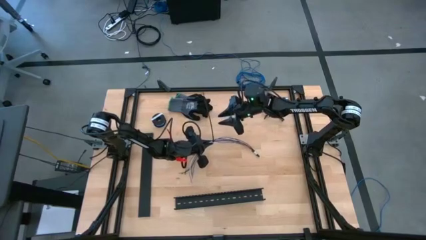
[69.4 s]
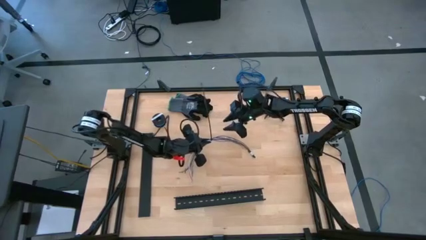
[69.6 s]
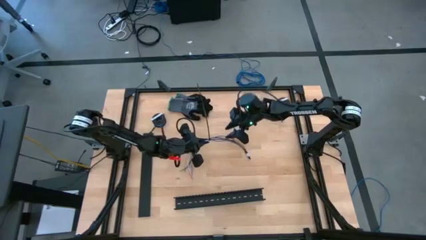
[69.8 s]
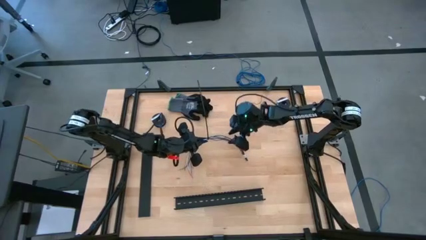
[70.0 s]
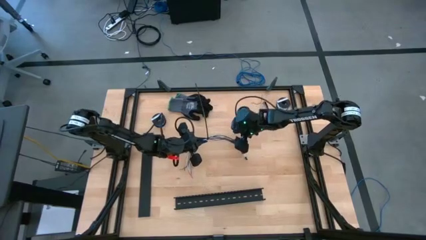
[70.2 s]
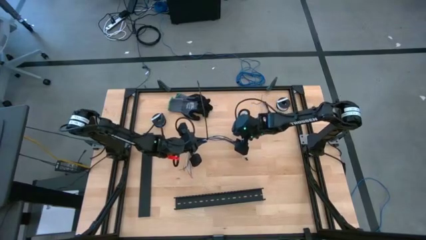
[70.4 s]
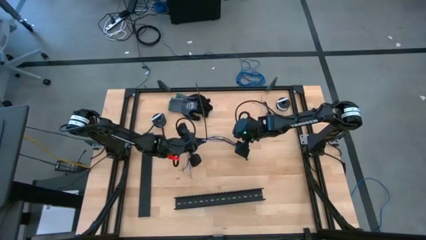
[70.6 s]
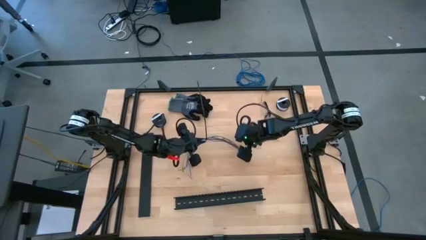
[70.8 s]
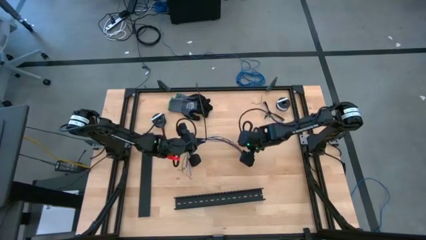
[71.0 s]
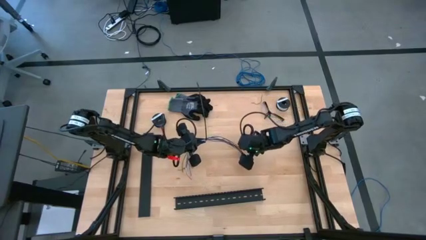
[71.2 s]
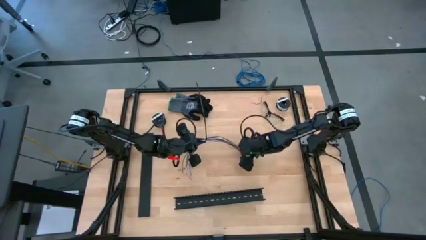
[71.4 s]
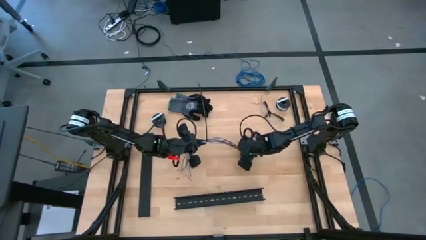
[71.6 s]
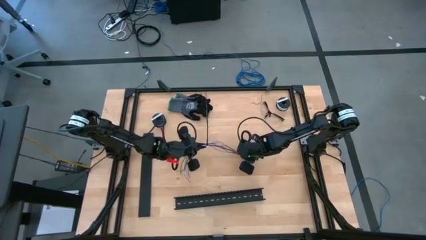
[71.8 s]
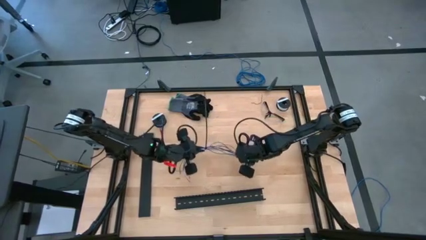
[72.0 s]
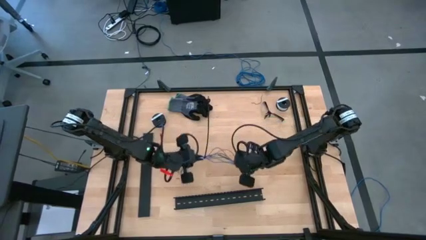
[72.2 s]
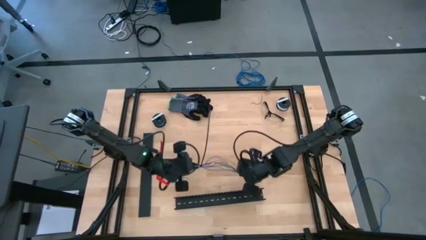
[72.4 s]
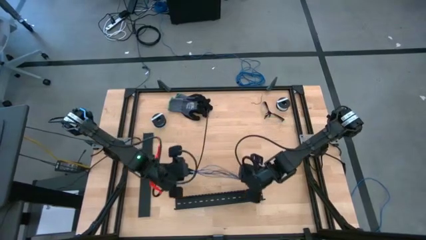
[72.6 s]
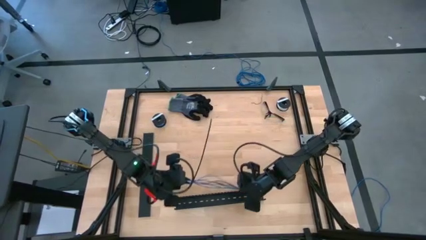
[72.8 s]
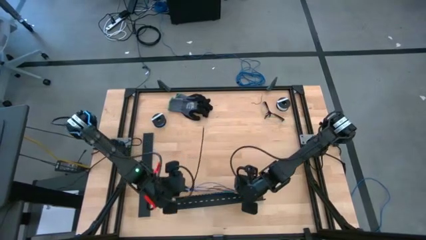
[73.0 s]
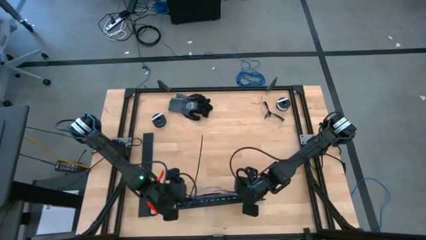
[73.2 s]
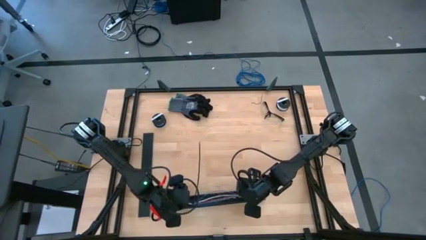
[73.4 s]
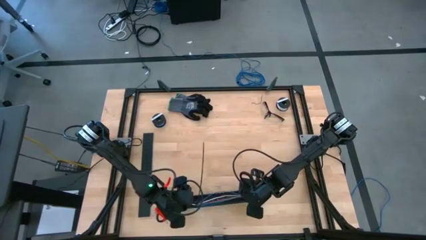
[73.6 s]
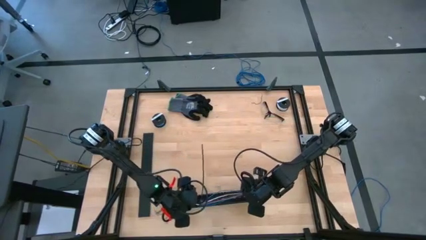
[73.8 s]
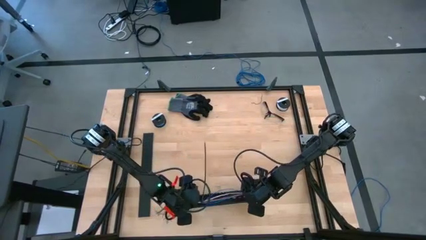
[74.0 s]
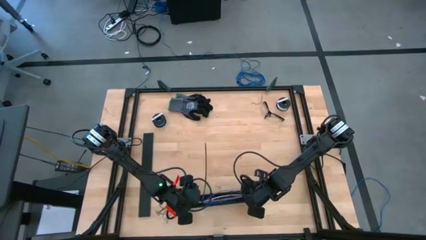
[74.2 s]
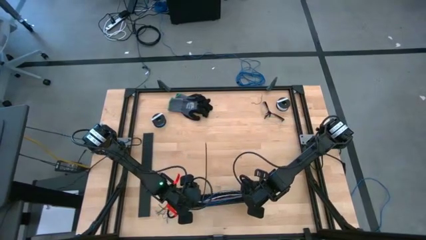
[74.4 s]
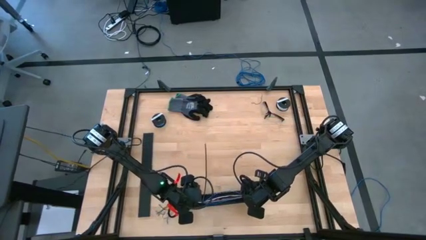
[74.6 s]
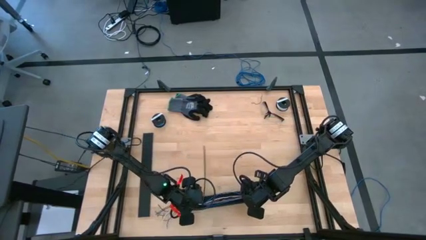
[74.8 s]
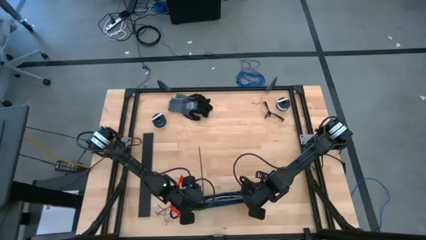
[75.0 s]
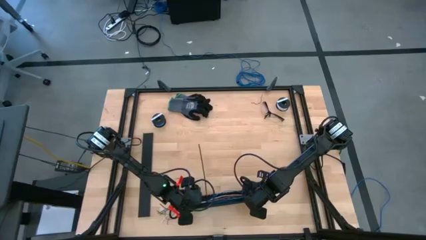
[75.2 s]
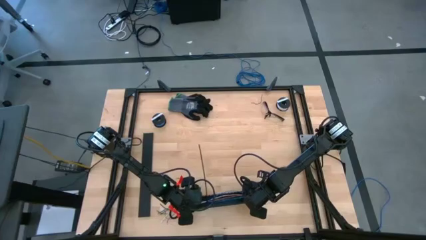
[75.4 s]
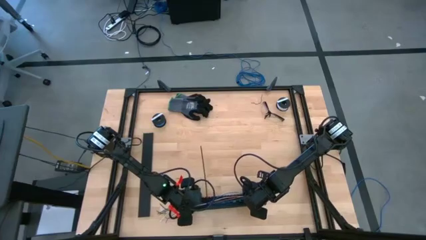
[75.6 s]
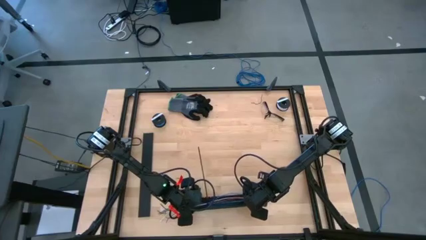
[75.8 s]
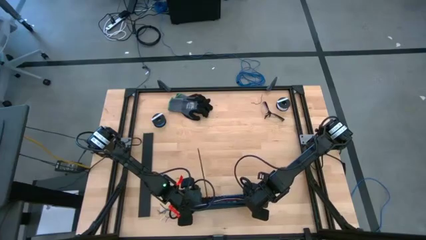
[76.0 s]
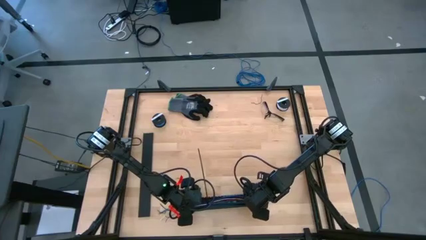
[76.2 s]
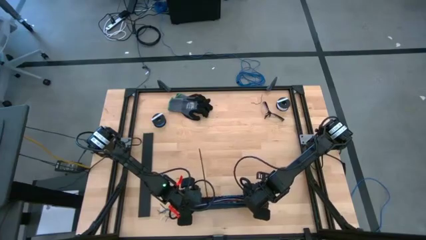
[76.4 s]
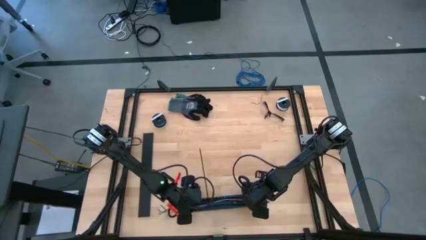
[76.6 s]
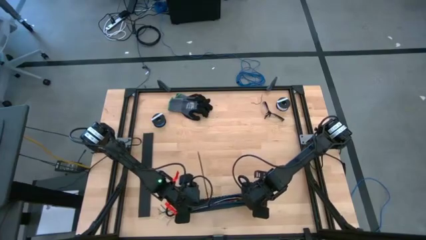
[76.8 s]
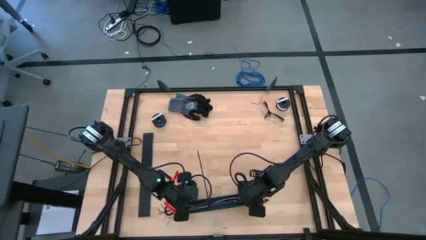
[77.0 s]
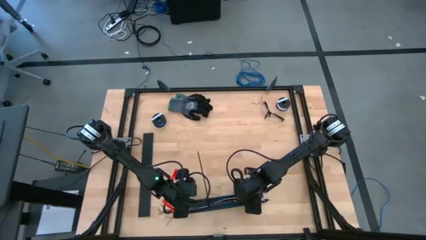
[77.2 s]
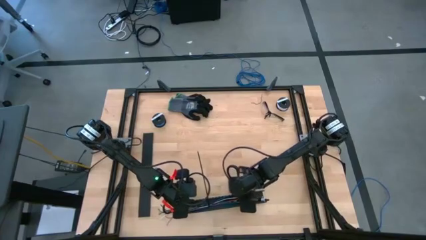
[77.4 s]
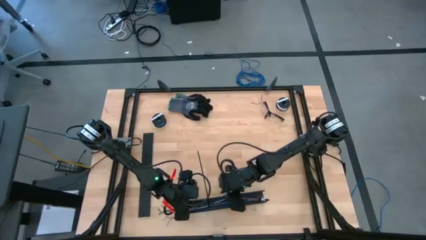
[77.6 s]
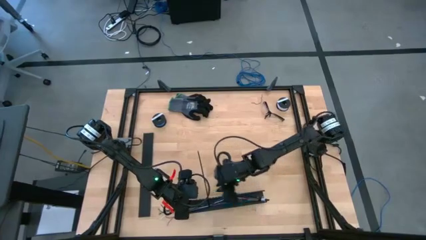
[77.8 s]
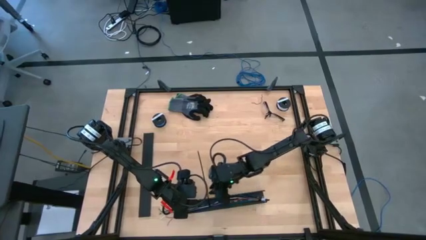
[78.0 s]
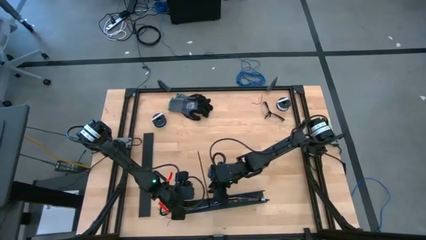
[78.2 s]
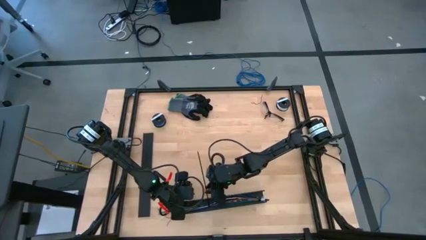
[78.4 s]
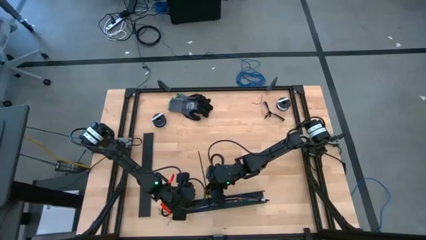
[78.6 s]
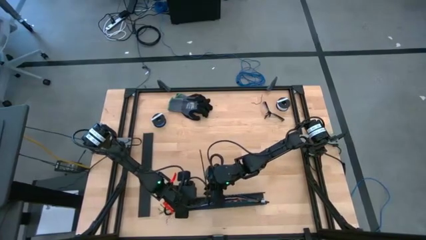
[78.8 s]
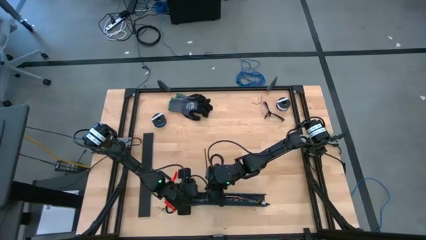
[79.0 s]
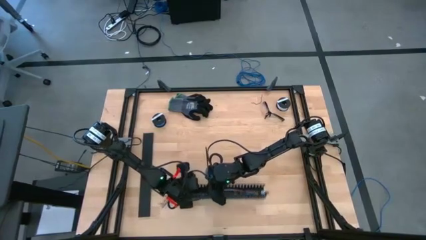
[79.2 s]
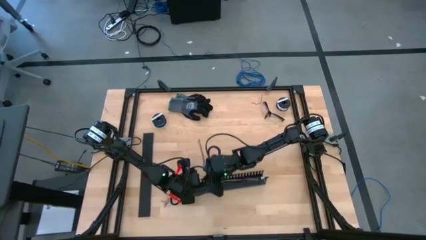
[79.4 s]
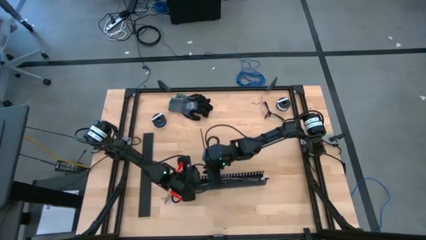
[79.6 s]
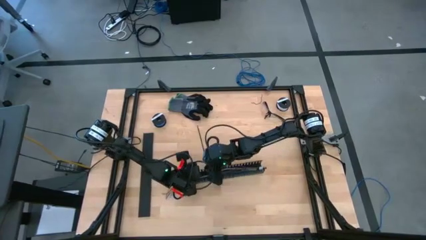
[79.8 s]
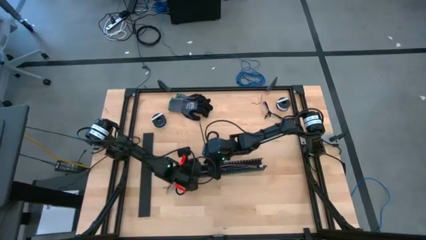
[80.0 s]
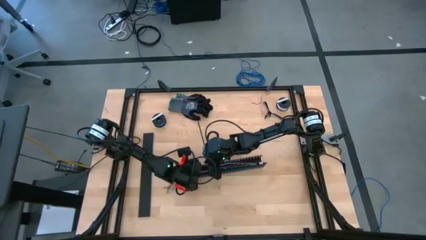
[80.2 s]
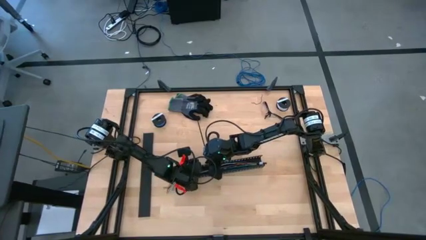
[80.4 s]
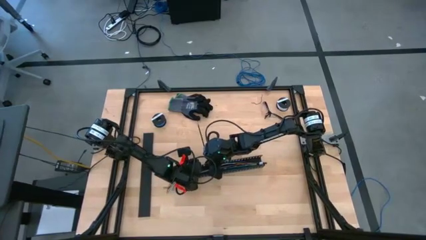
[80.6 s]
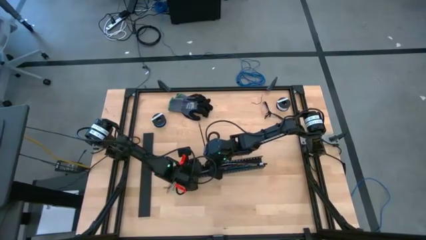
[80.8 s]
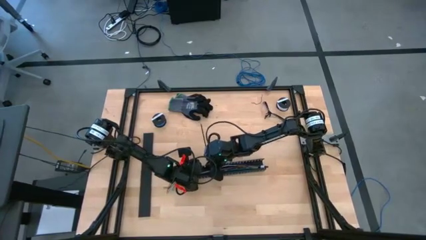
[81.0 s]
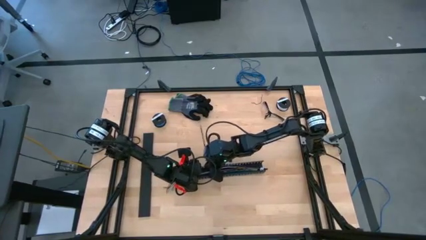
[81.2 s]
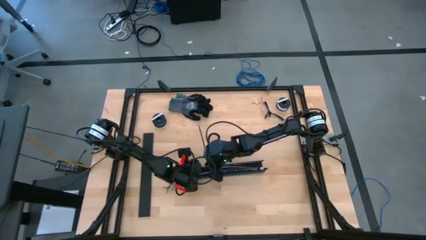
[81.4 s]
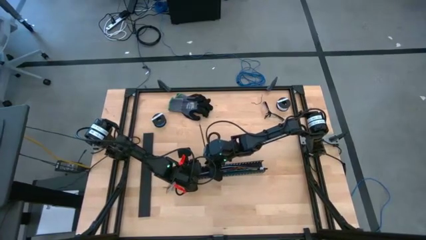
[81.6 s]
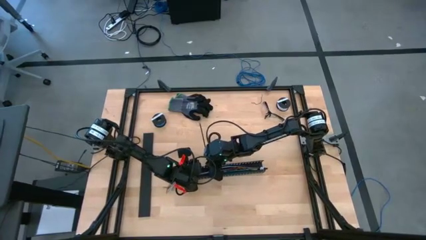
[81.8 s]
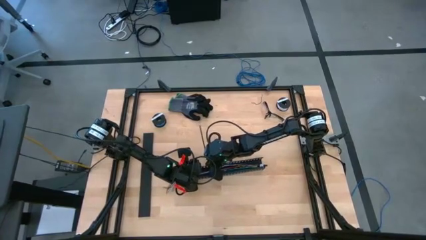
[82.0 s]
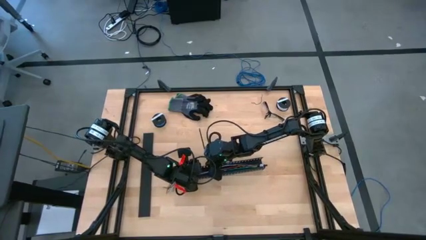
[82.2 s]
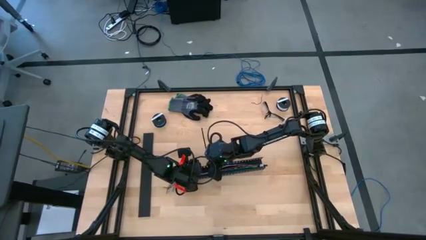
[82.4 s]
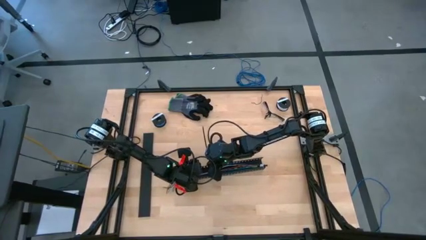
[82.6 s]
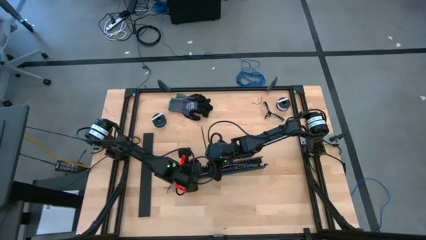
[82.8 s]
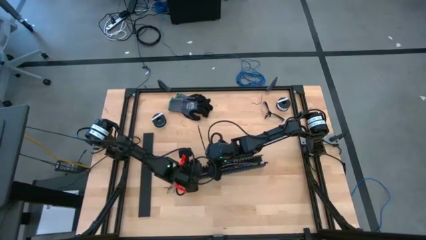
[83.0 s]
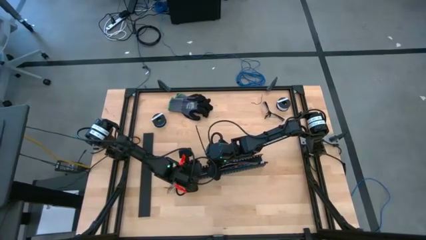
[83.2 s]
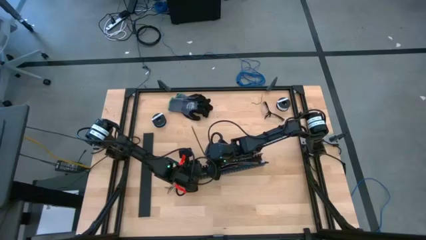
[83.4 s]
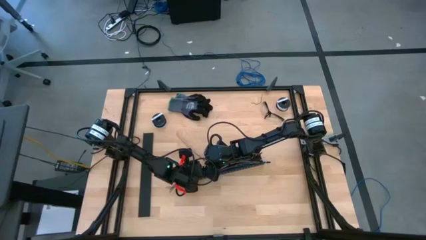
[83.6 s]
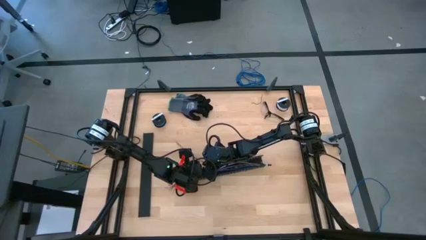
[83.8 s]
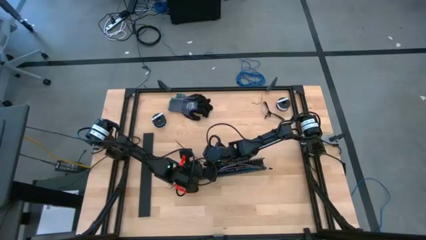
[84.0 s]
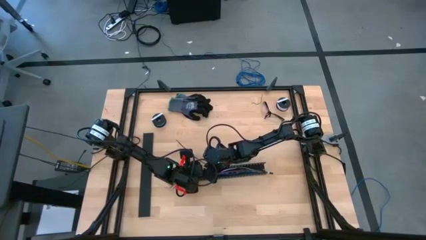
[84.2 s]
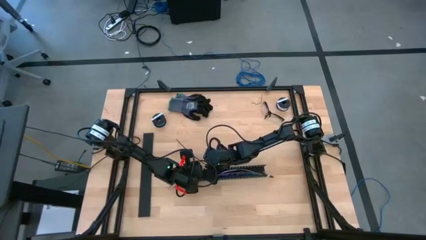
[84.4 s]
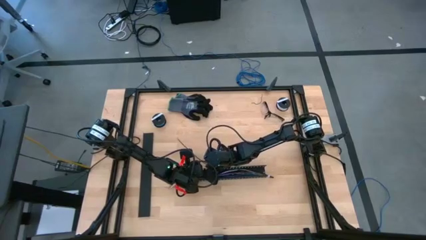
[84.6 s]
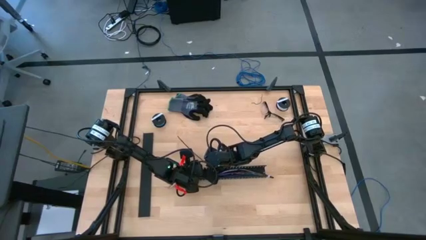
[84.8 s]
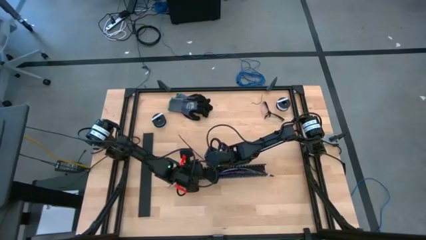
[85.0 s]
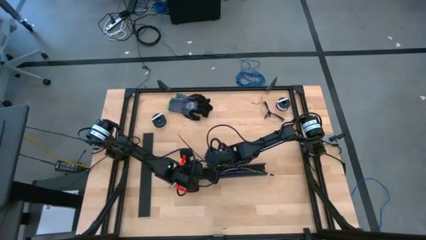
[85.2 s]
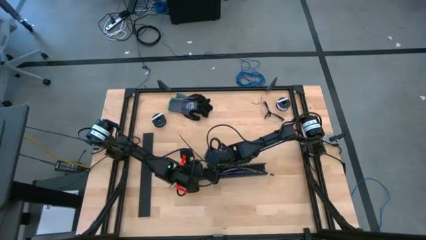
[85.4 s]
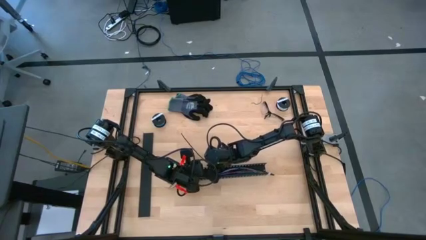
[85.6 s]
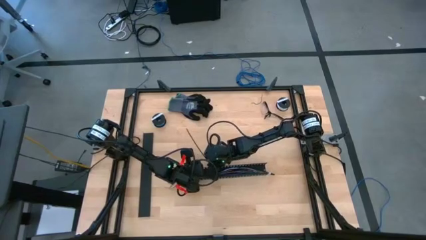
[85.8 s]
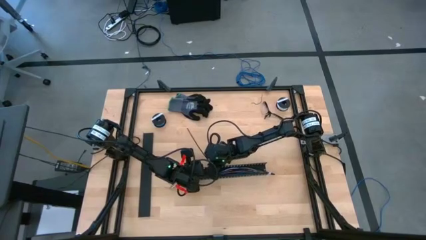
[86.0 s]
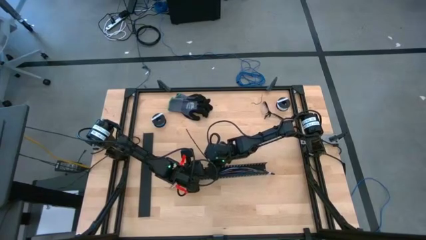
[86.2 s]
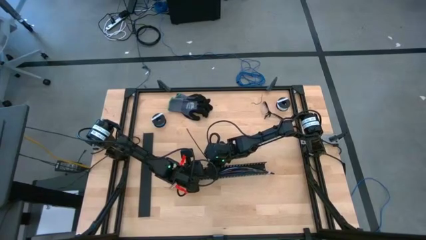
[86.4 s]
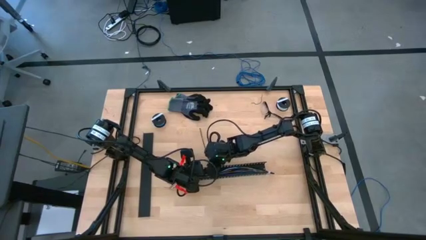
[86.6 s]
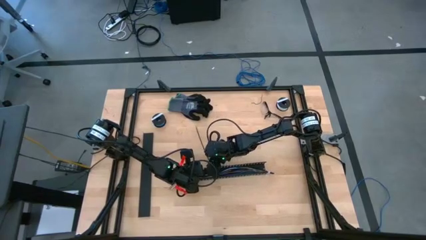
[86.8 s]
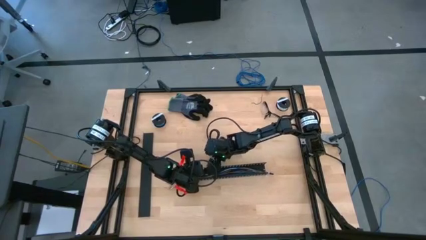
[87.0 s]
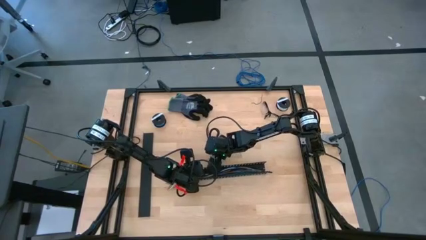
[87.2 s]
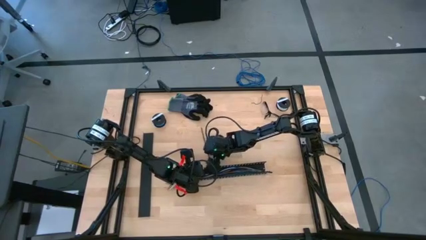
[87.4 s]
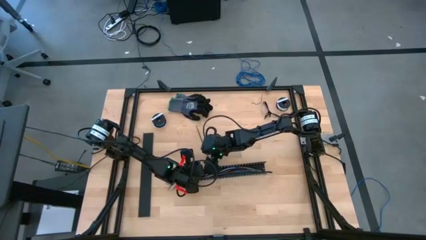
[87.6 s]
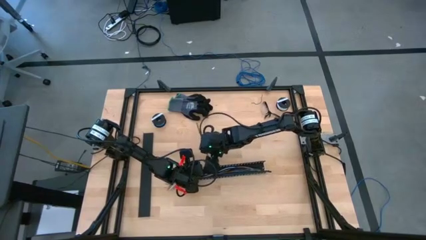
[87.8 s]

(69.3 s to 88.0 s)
Task: Ziptie cables
Put the zip-tied cable wires into the black cable duct
